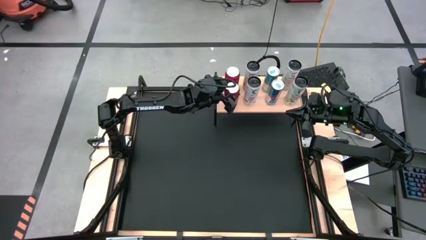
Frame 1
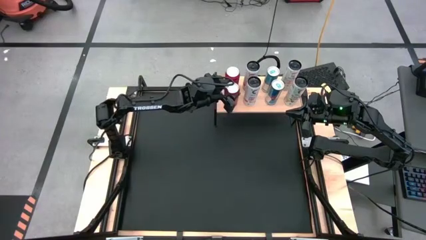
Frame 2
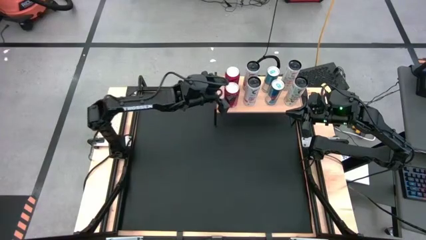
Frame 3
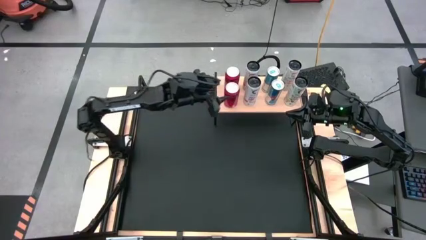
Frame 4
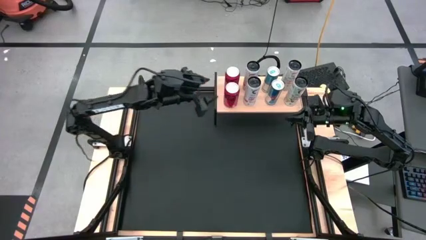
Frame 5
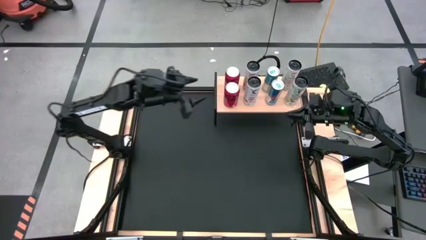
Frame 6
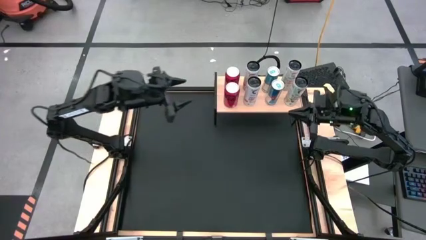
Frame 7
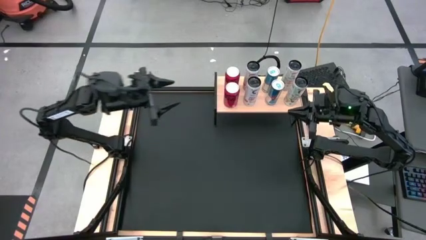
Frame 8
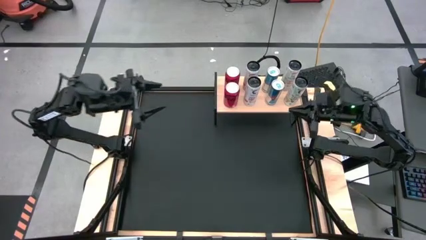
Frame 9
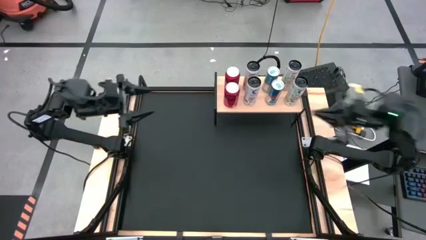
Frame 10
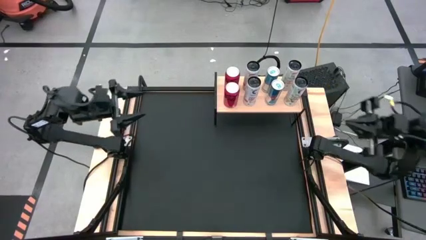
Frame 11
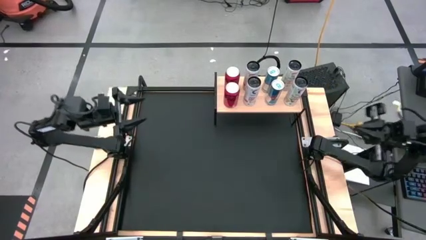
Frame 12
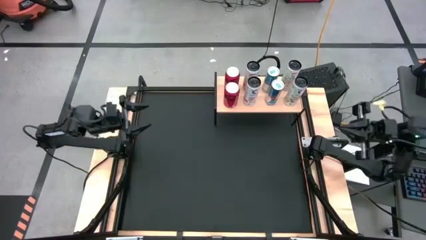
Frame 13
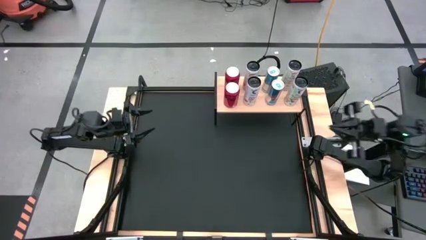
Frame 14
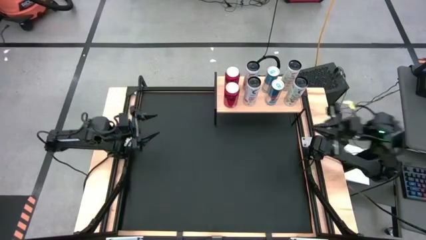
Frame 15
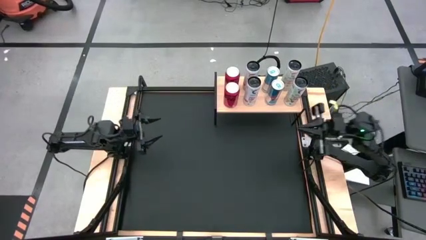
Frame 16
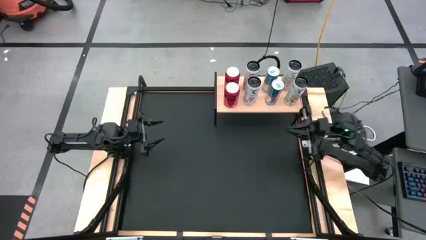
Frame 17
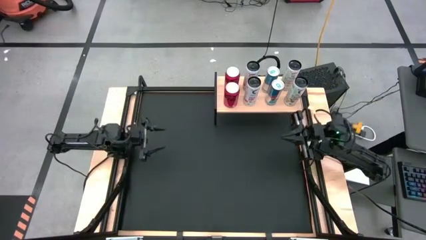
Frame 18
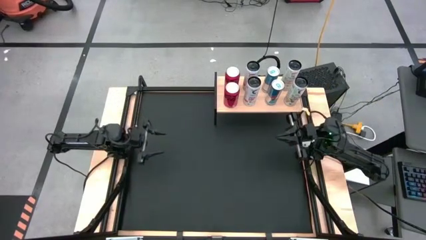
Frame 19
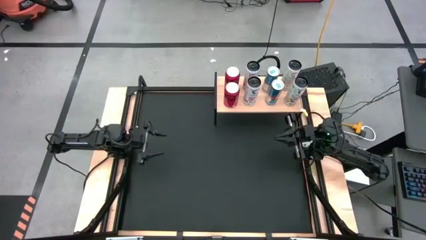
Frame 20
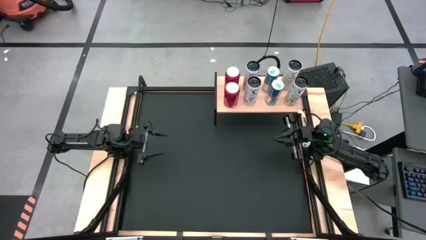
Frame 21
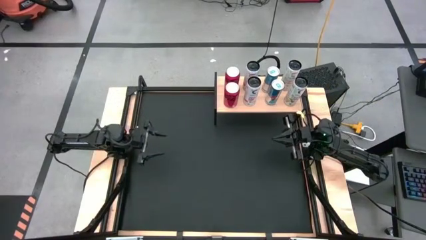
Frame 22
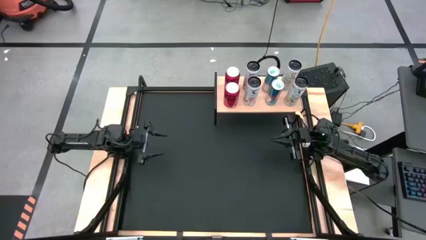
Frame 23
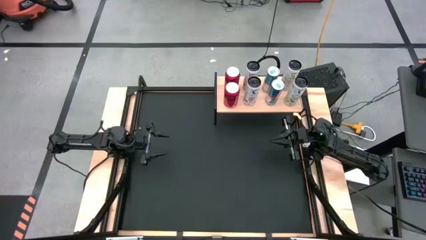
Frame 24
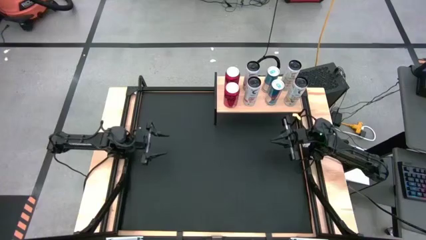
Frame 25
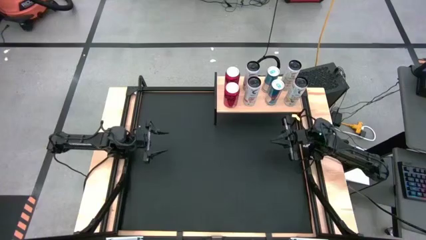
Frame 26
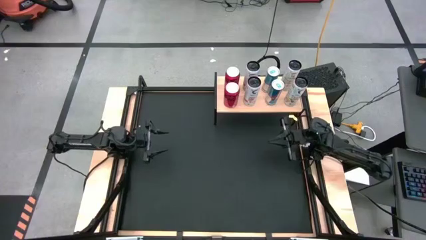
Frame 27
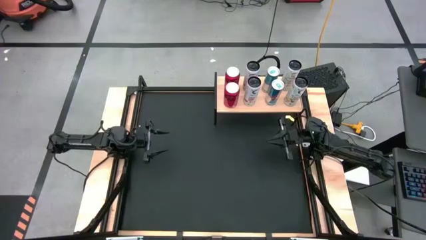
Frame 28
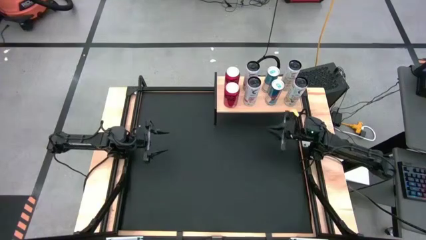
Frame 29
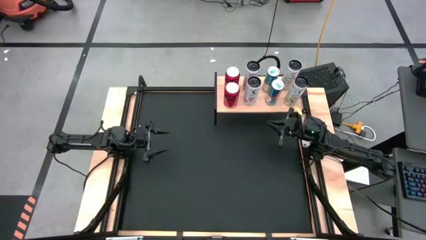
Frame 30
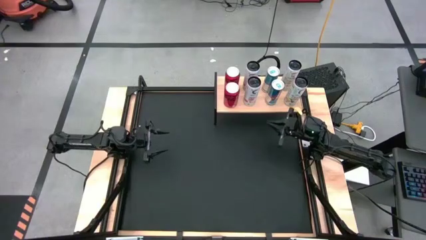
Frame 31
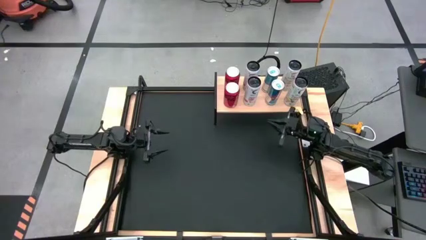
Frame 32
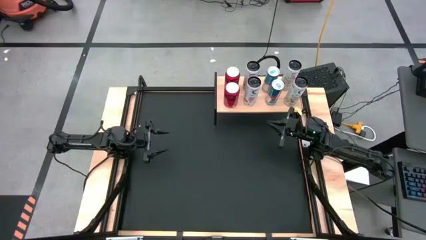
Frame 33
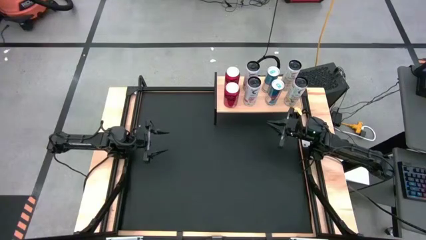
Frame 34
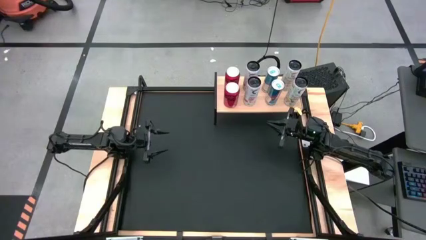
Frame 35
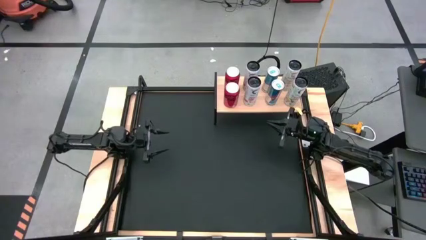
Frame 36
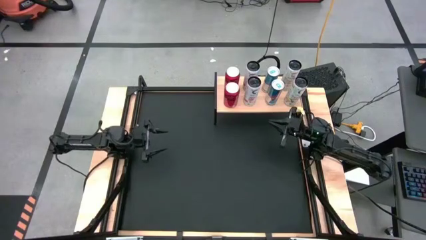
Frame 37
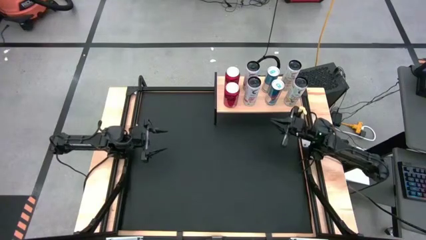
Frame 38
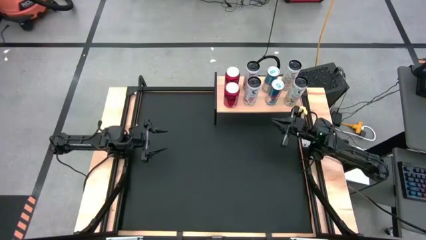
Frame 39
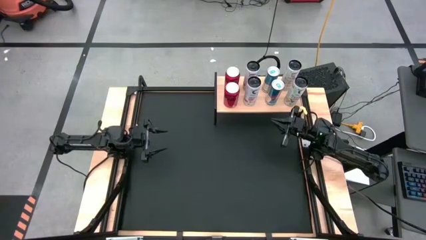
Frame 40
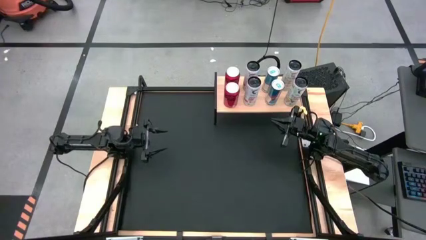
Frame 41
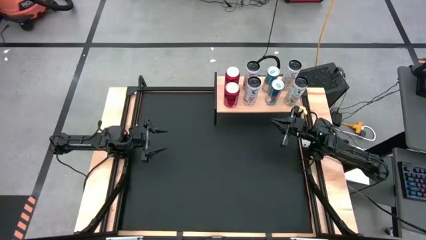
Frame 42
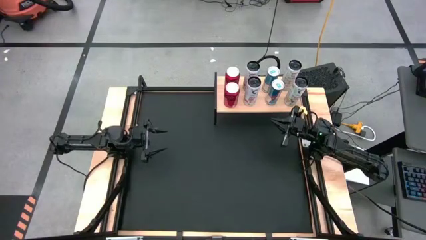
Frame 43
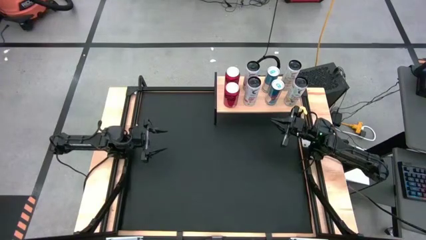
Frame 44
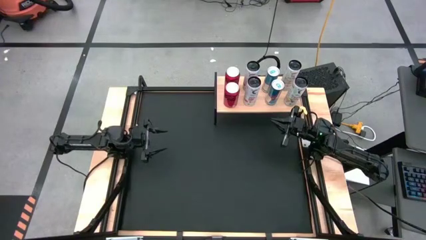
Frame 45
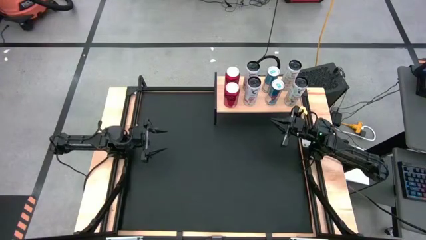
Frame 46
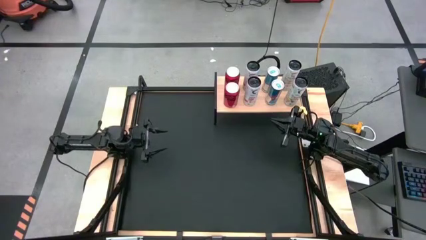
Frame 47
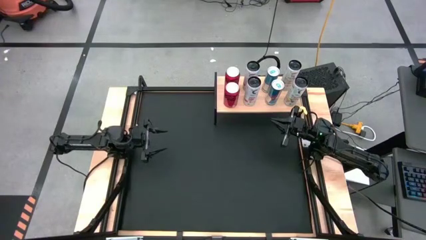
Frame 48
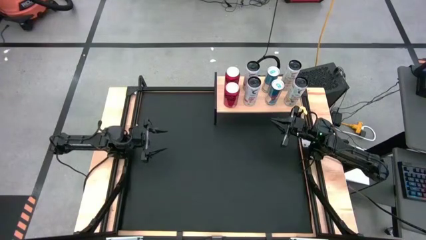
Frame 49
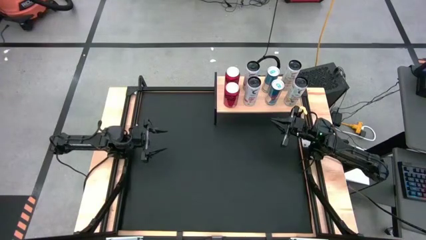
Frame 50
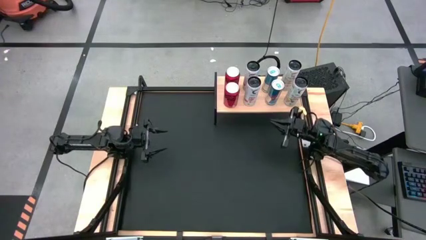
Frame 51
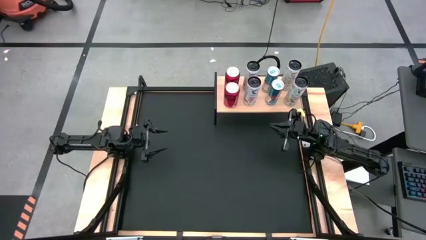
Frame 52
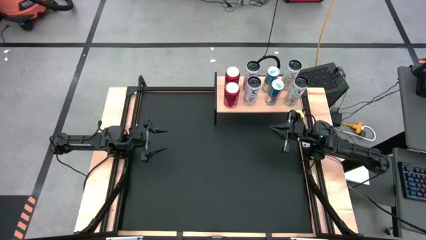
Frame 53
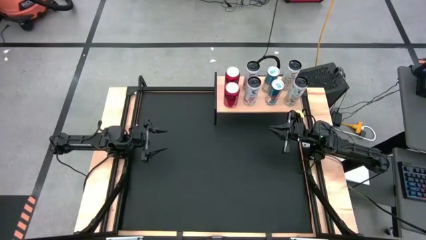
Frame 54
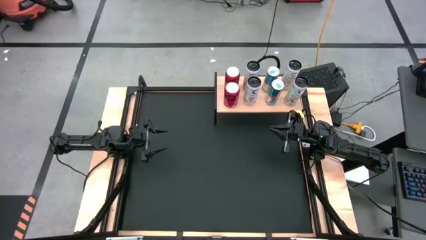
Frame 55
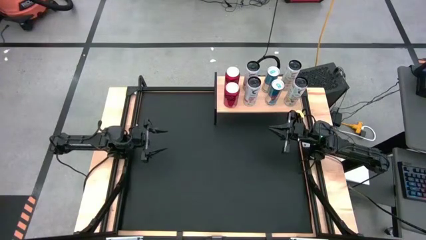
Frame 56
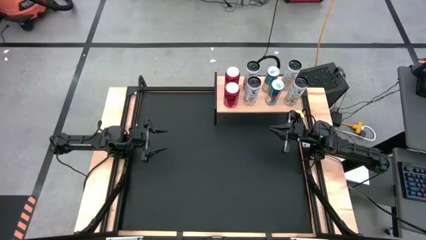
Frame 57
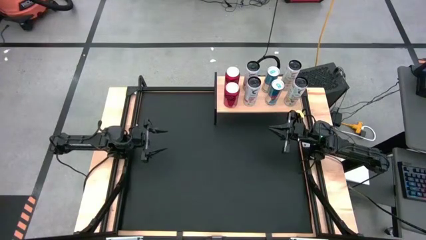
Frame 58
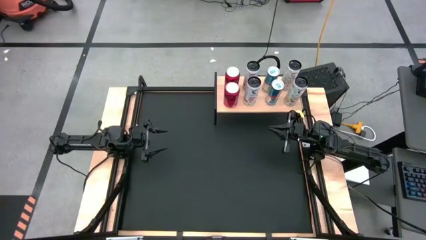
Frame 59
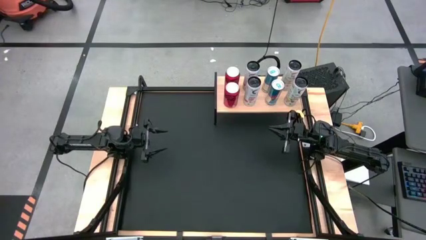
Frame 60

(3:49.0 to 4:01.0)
Task: Place canned beverage on shelf
Return to Home Position
